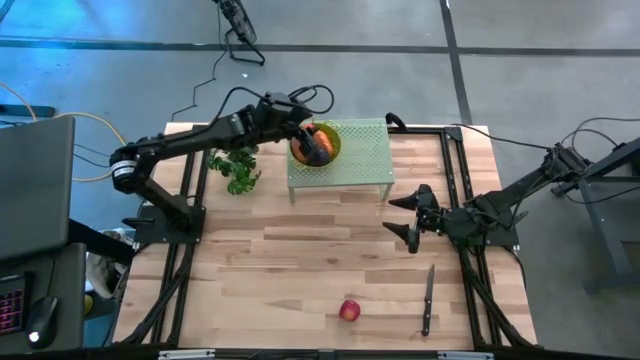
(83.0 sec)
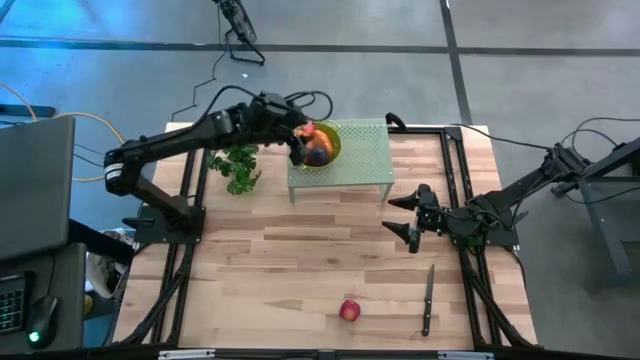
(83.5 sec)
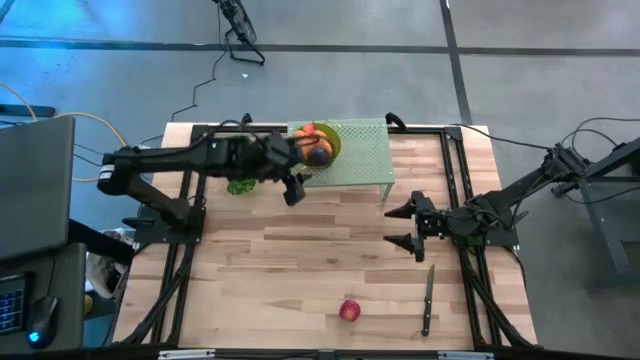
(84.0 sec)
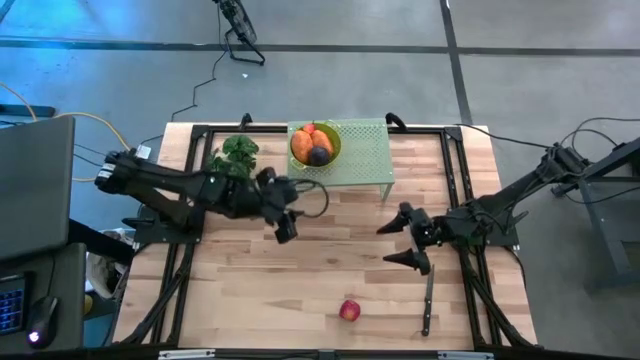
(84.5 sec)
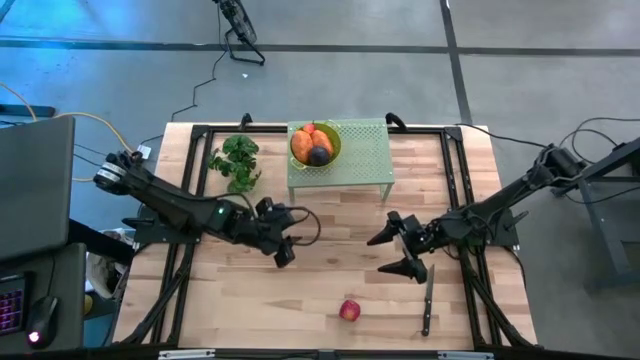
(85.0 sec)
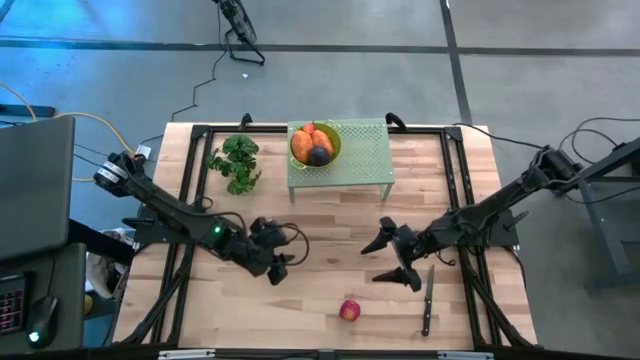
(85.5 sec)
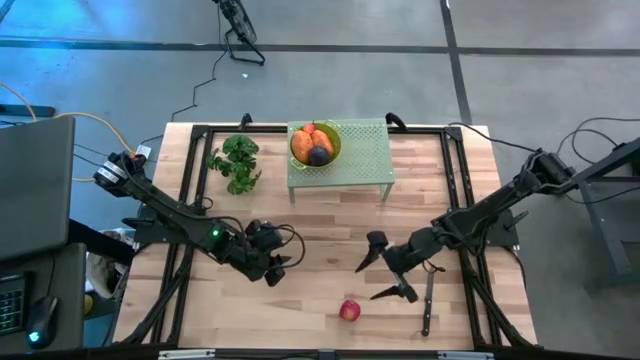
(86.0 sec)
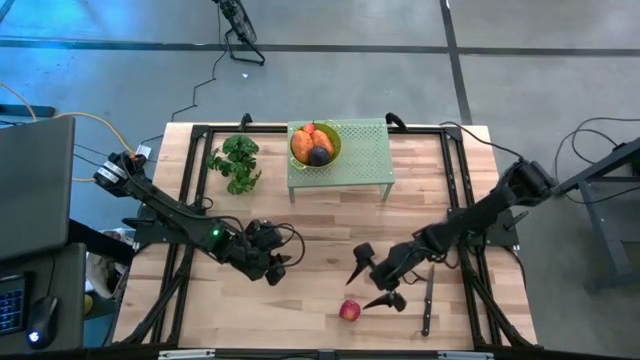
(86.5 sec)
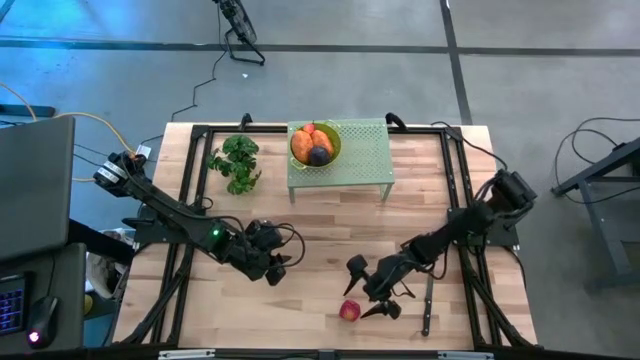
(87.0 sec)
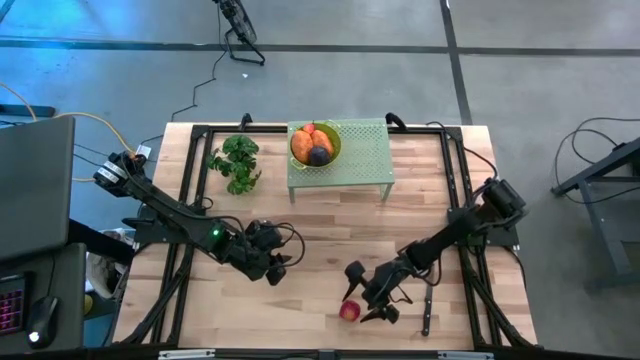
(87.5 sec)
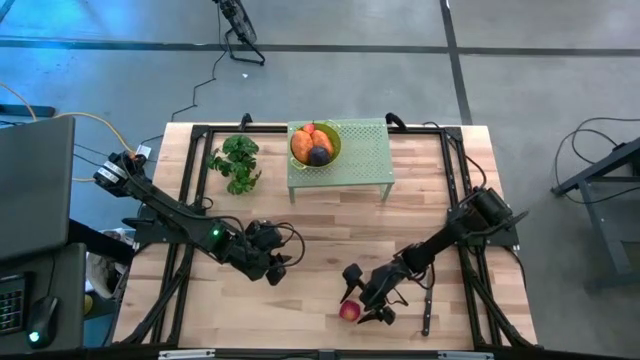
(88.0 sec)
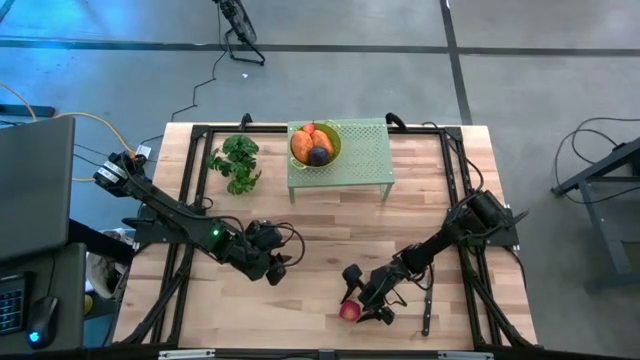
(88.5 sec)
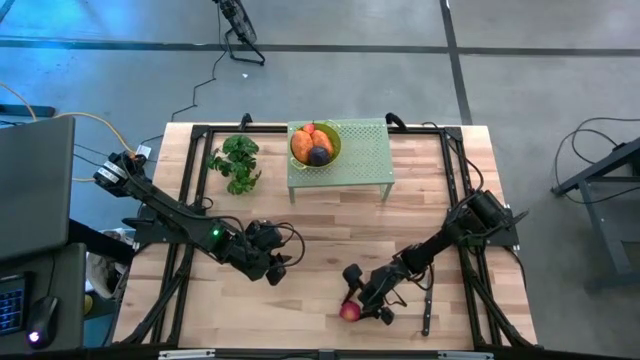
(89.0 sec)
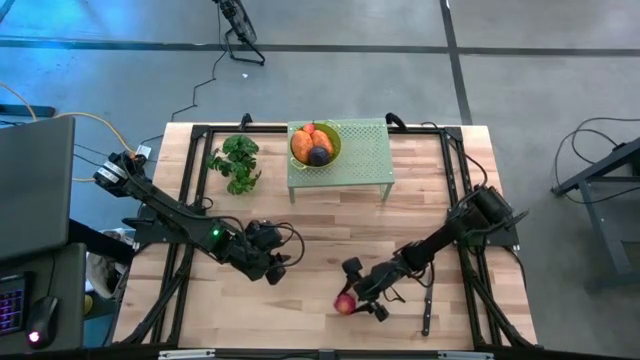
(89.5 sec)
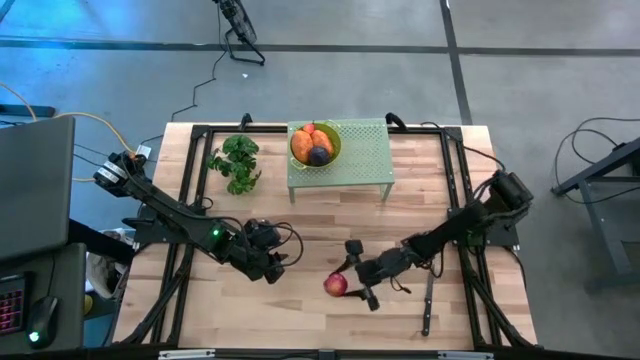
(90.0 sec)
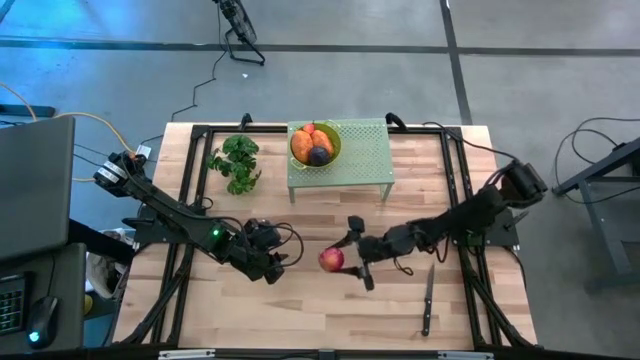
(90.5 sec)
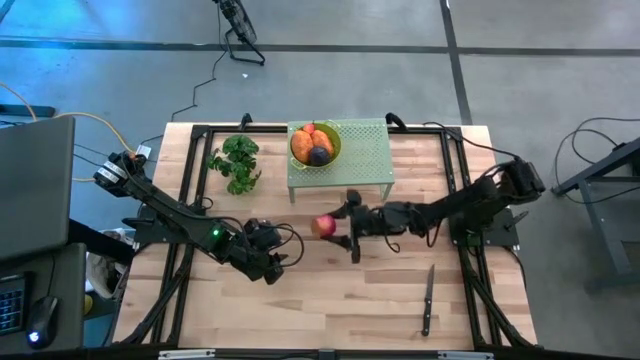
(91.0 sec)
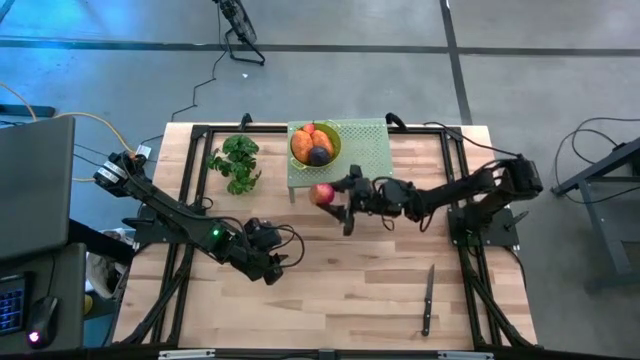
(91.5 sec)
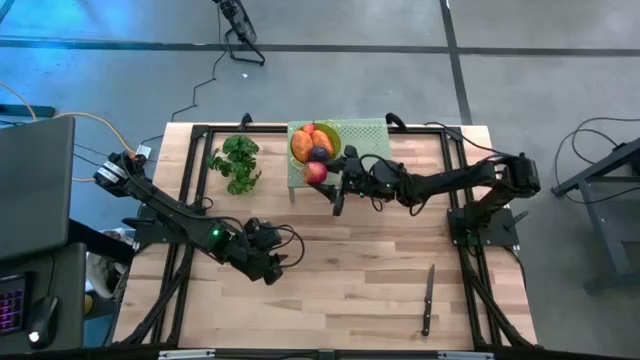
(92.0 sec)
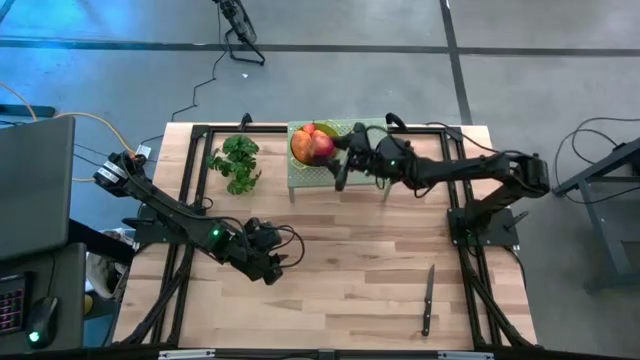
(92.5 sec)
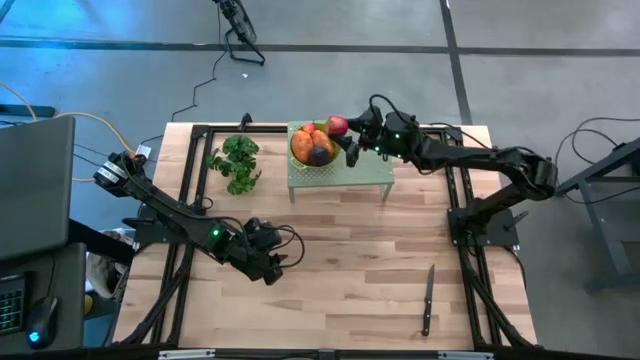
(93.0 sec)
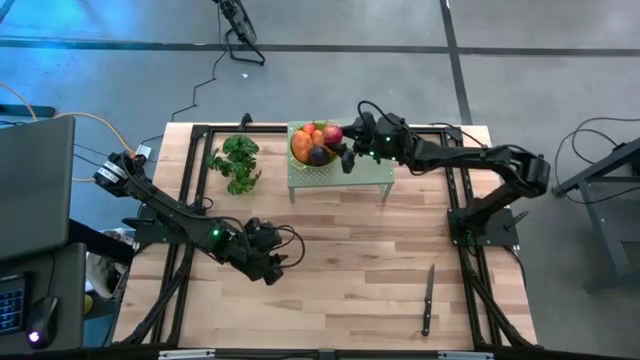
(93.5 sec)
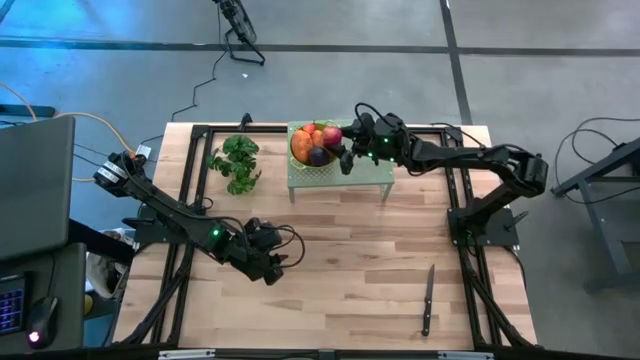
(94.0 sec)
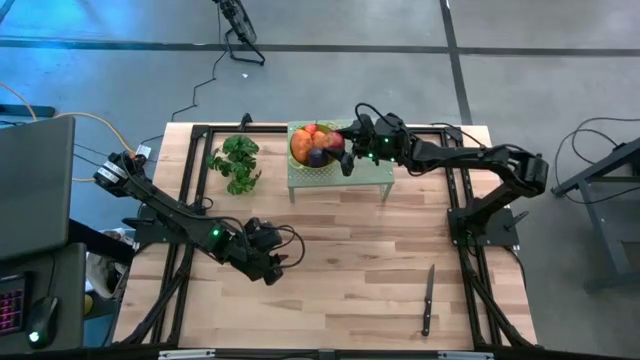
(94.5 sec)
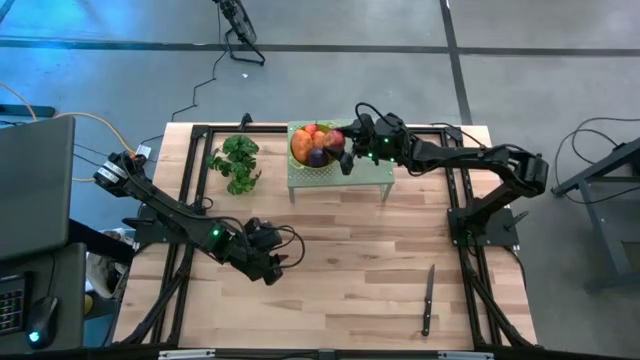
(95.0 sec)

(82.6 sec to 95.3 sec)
Task: Pick & Place Fruit
Put the red apple into the green strainer bowl on the shelf

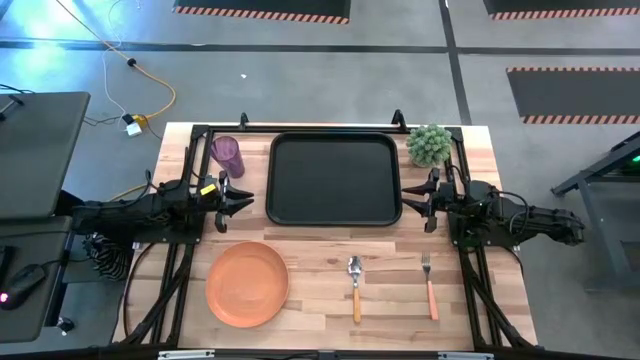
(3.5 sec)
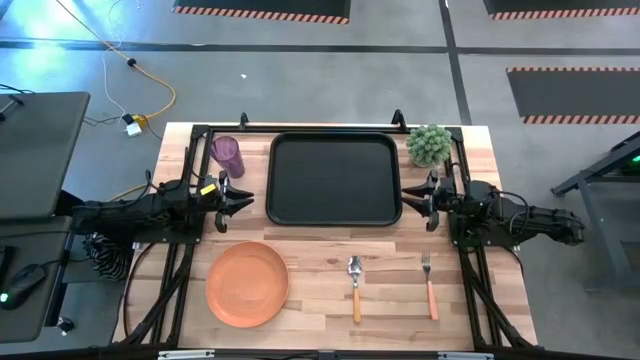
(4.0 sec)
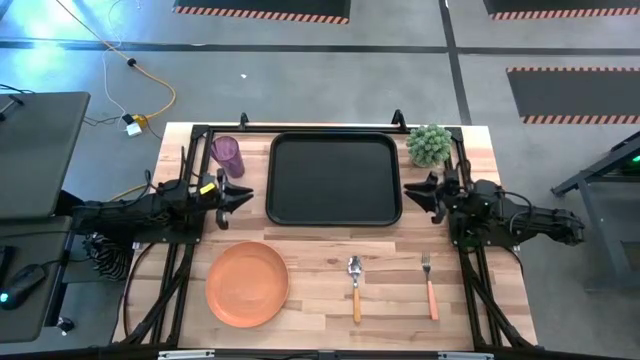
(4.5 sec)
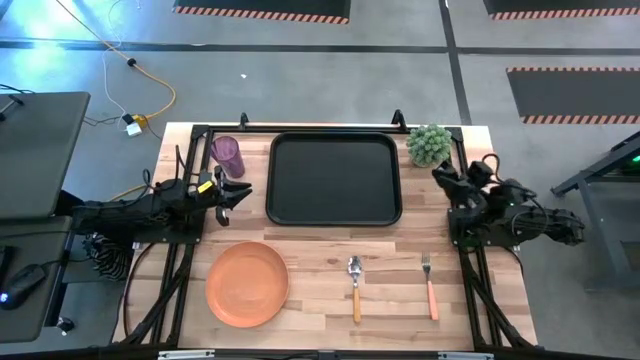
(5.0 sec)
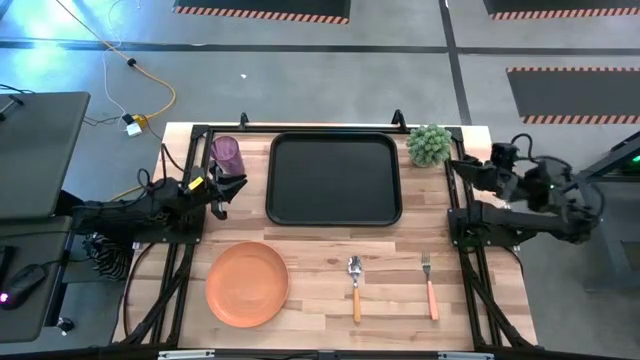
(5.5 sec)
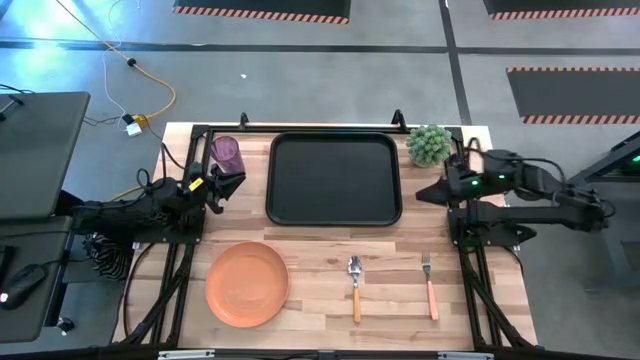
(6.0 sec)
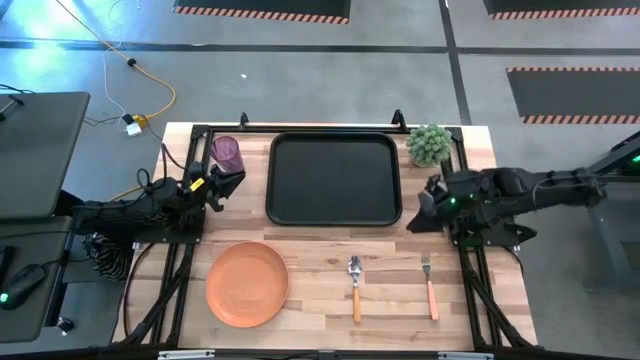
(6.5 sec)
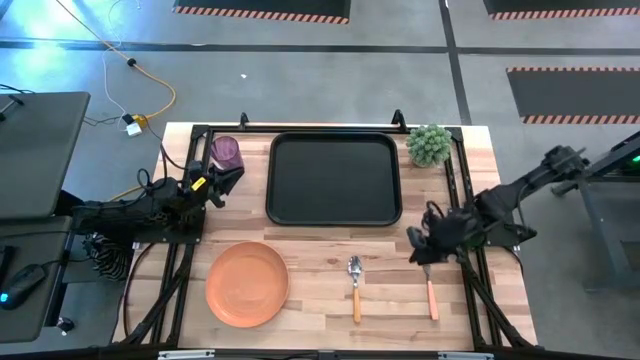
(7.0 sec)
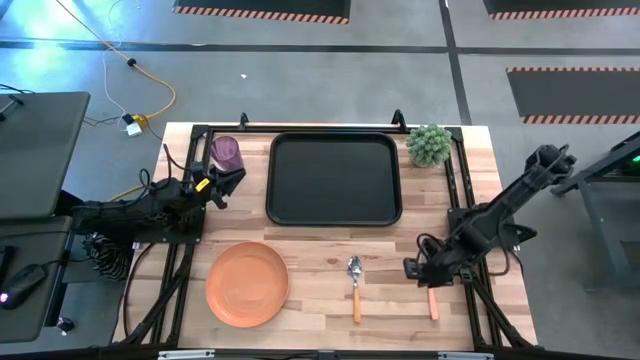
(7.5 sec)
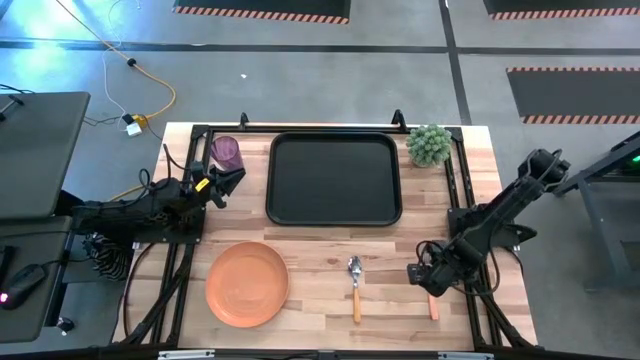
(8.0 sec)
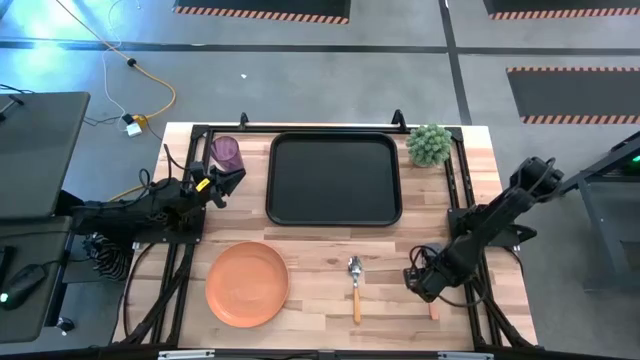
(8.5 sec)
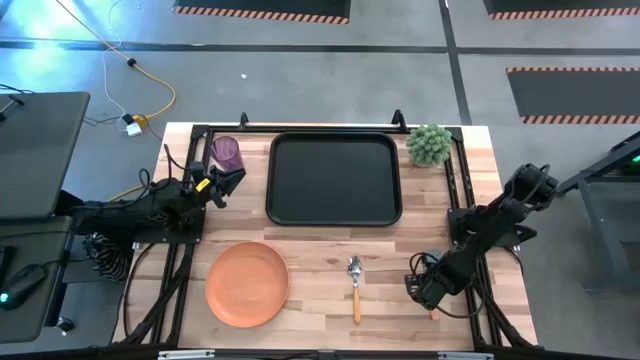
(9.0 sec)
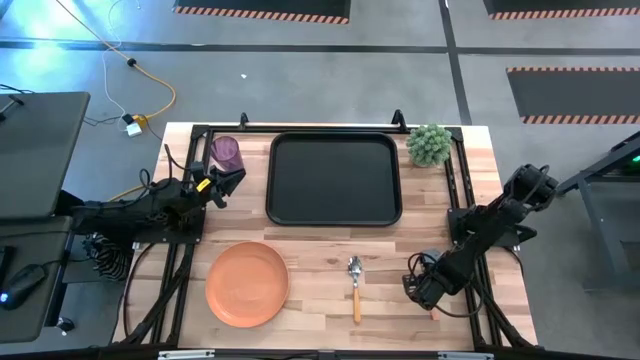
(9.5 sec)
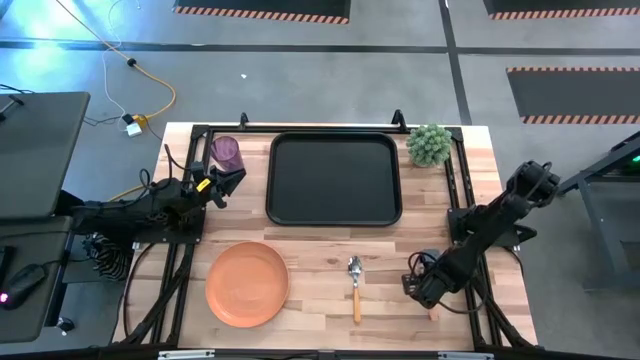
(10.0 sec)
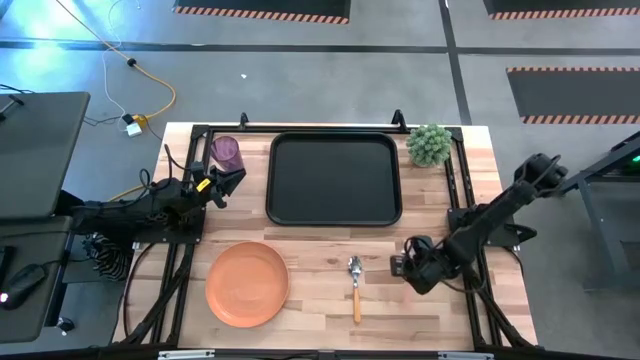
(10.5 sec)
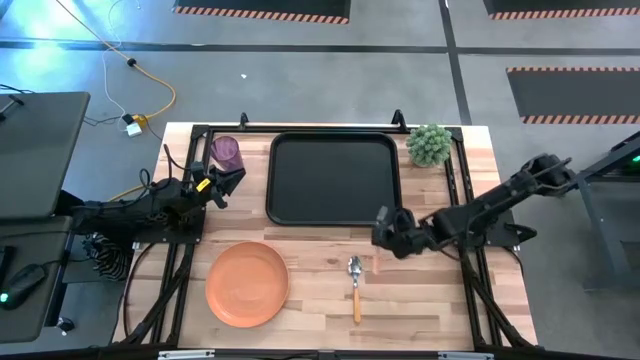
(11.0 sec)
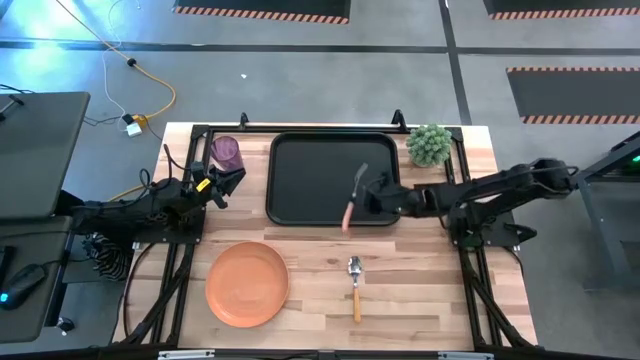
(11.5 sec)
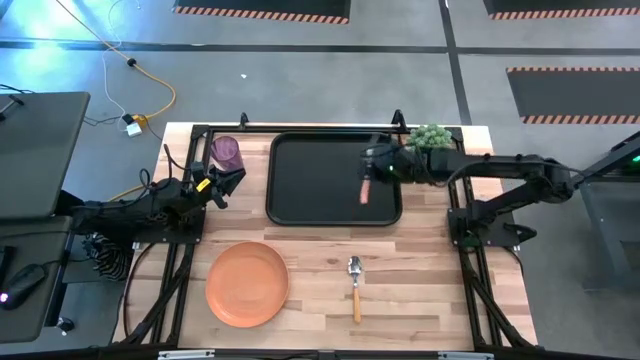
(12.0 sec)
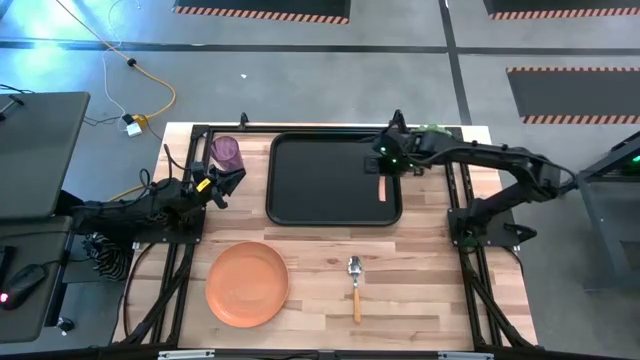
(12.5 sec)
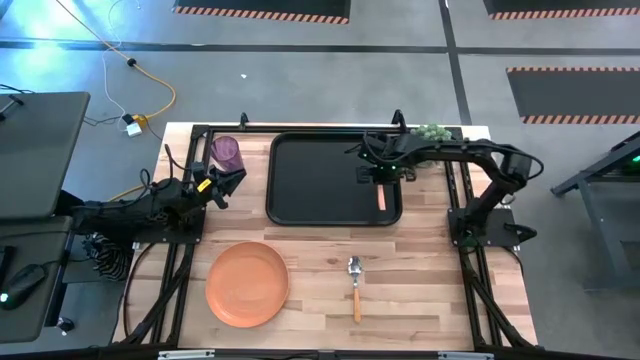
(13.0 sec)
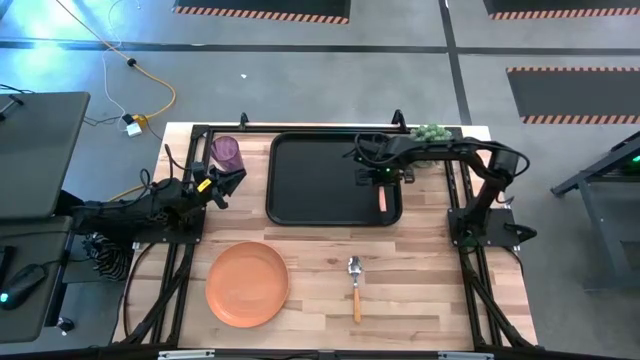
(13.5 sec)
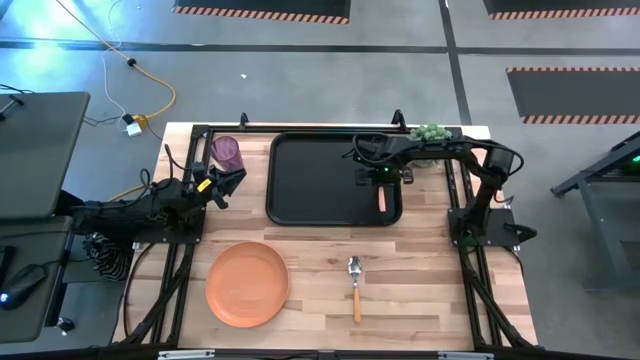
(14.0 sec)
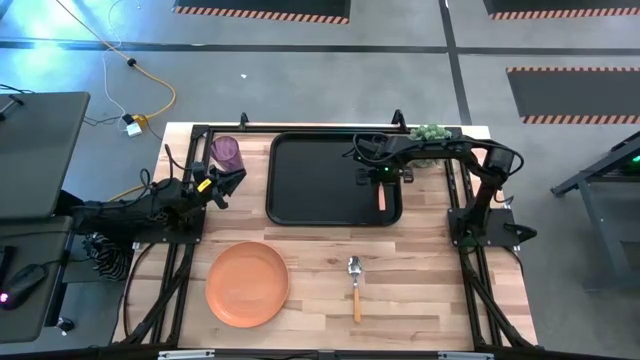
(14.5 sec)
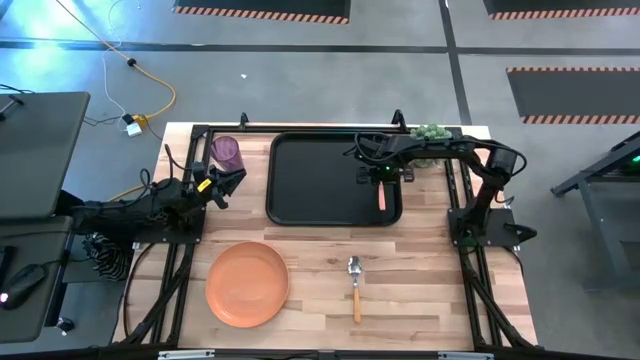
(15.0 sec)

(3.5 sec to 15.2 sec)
Task: Pick and place plate/cup/fork/spoon on tray
Put the orange fork on the tray
